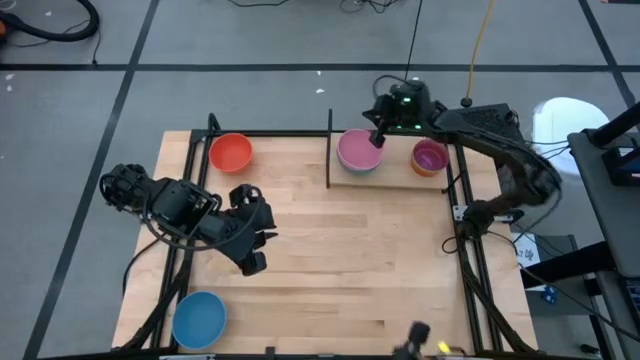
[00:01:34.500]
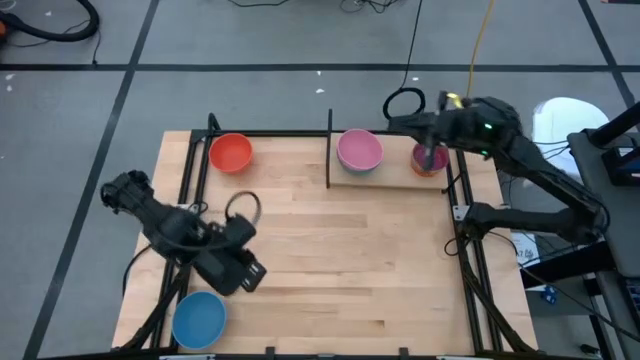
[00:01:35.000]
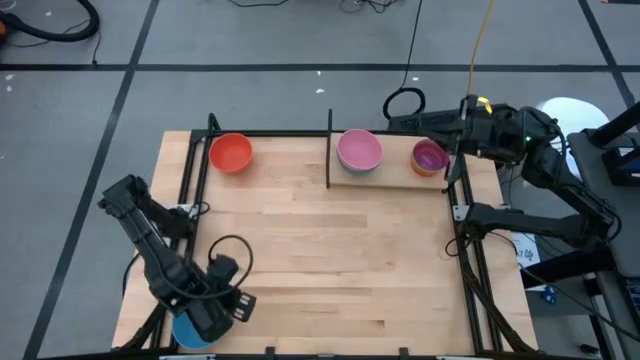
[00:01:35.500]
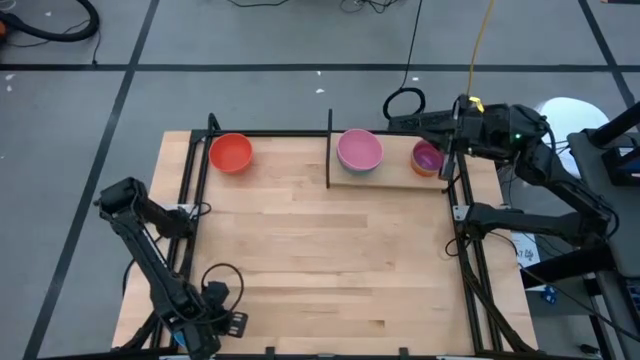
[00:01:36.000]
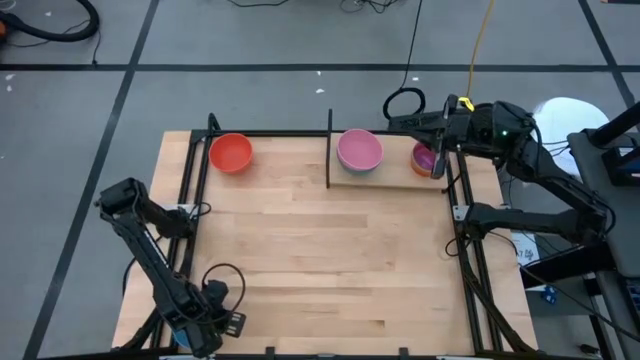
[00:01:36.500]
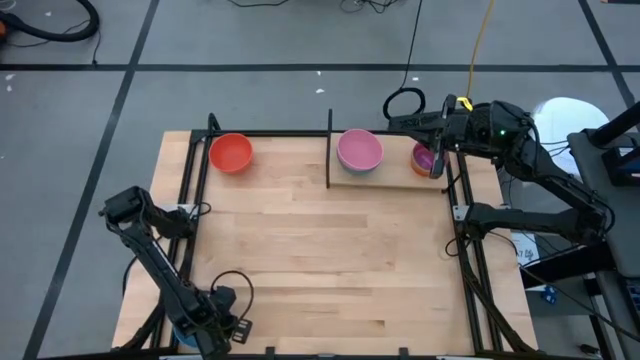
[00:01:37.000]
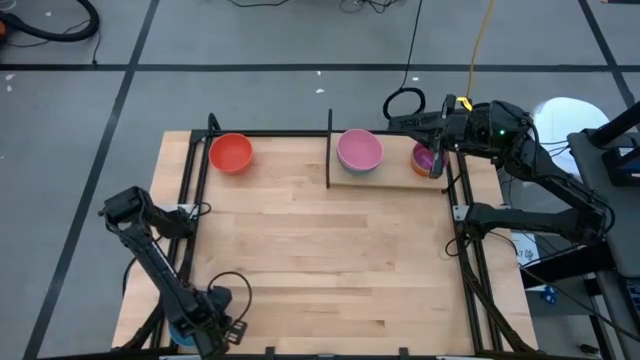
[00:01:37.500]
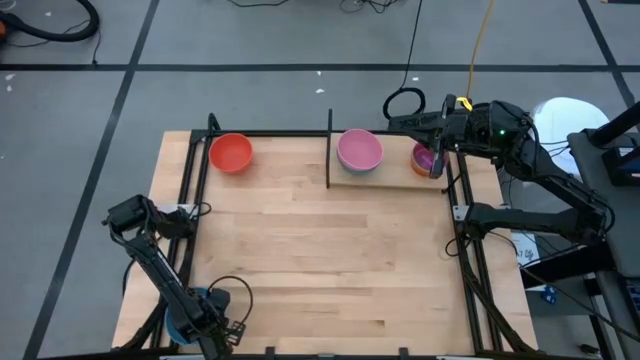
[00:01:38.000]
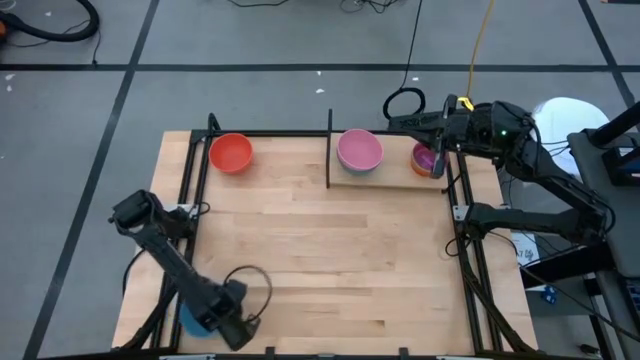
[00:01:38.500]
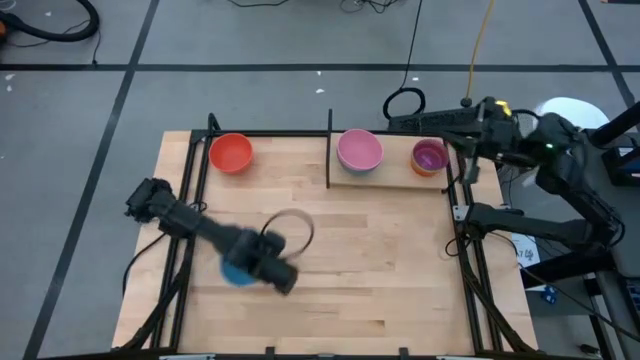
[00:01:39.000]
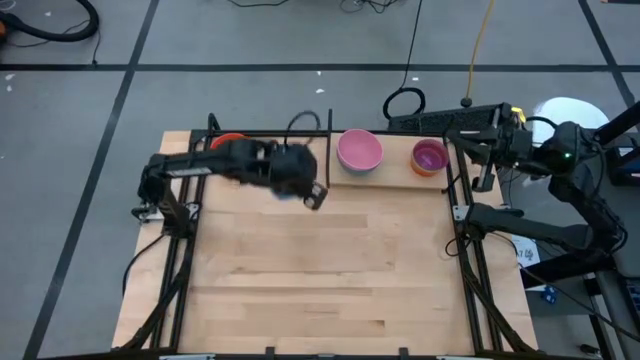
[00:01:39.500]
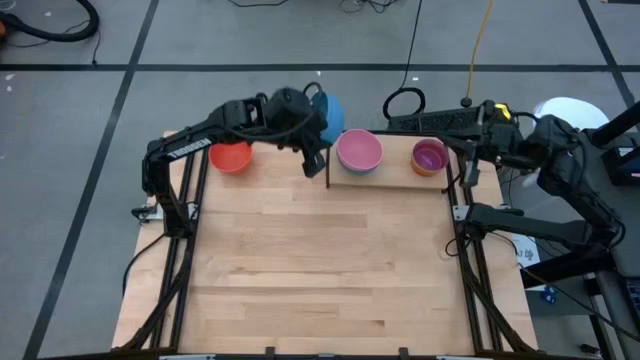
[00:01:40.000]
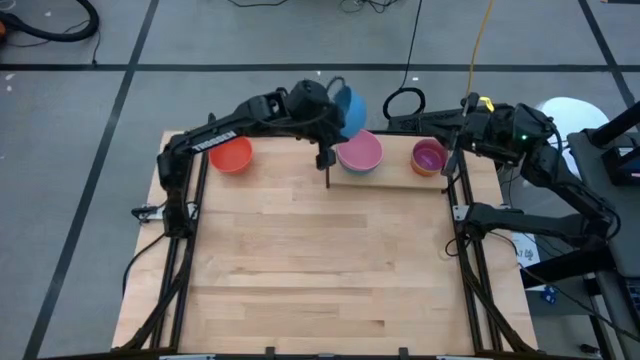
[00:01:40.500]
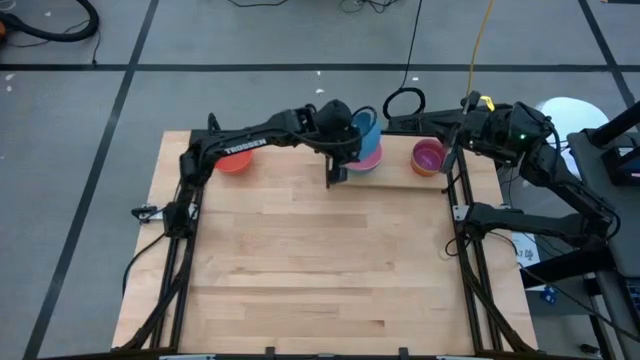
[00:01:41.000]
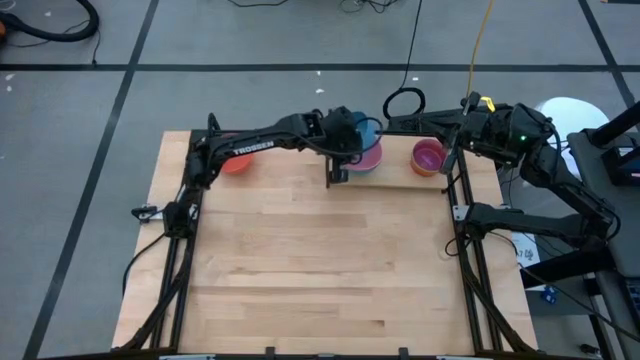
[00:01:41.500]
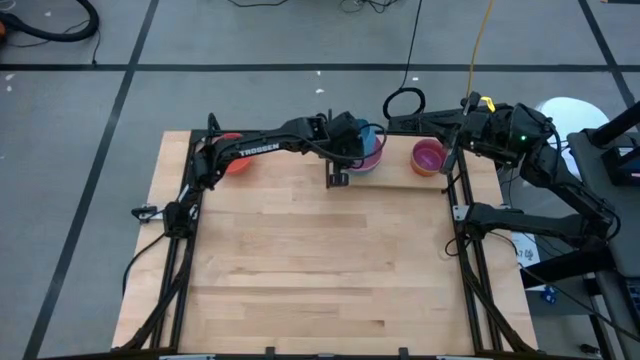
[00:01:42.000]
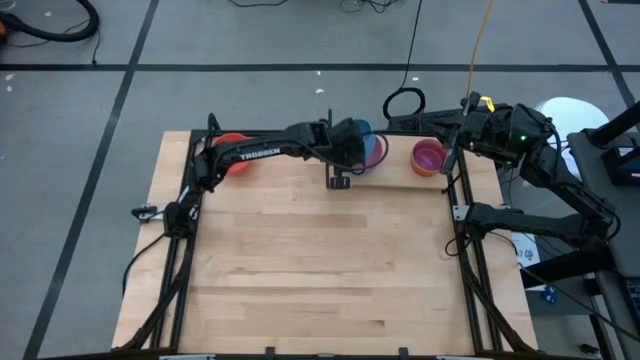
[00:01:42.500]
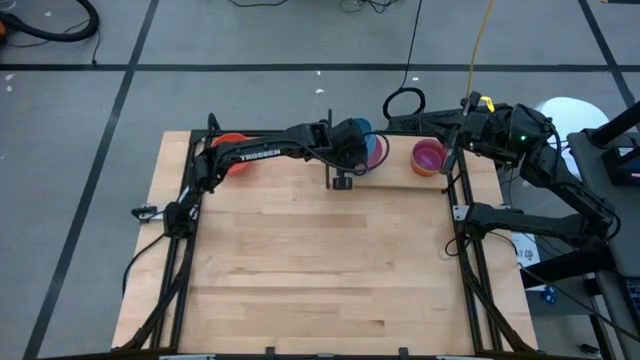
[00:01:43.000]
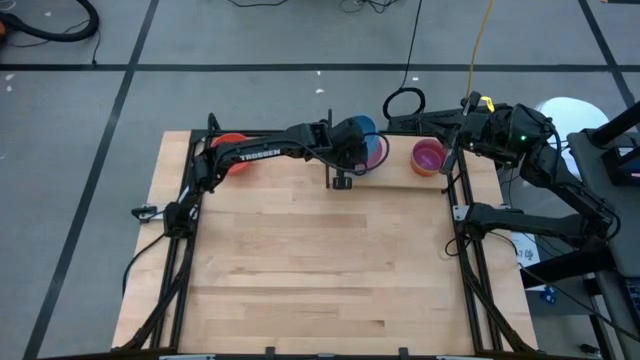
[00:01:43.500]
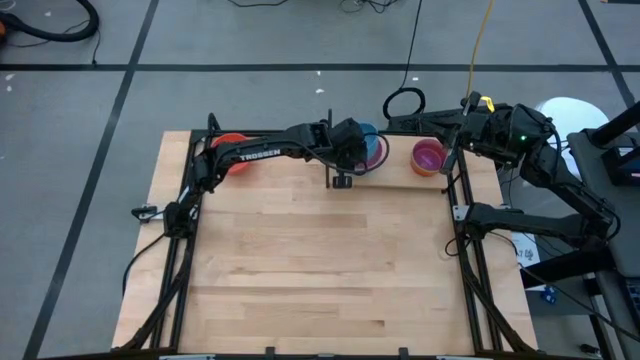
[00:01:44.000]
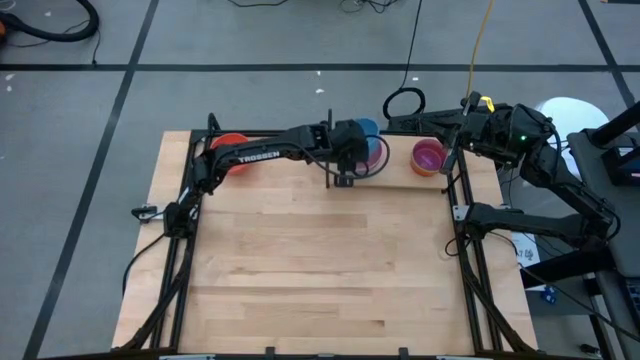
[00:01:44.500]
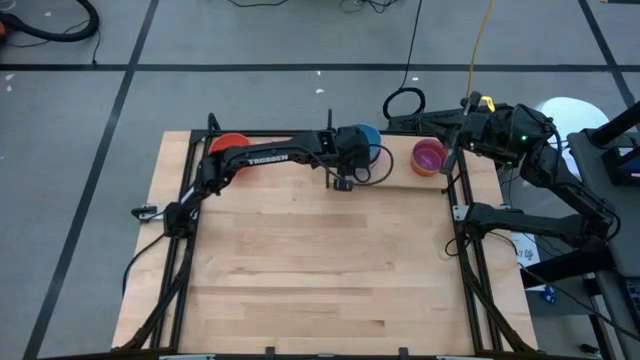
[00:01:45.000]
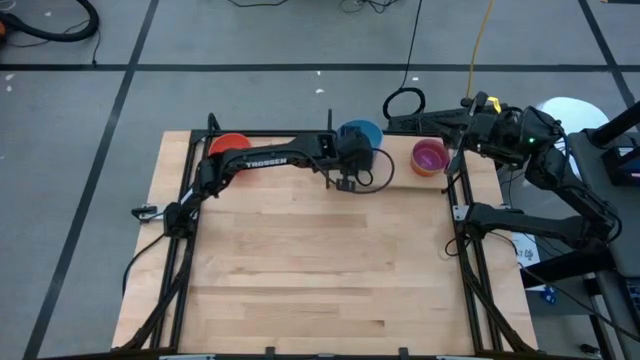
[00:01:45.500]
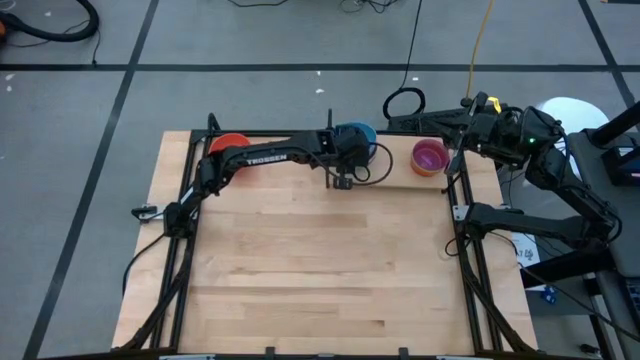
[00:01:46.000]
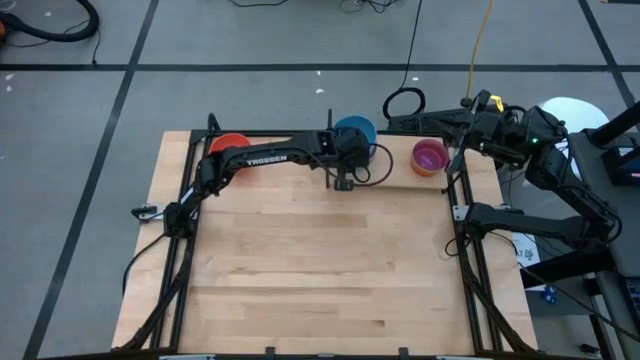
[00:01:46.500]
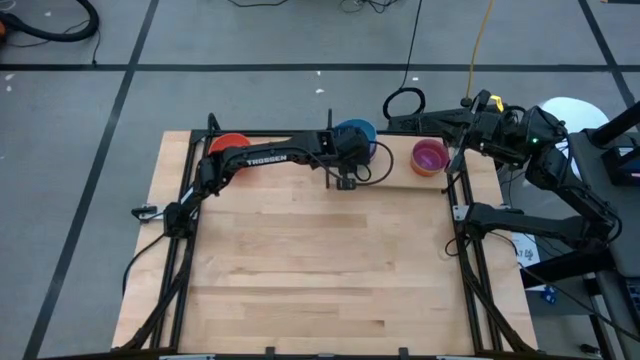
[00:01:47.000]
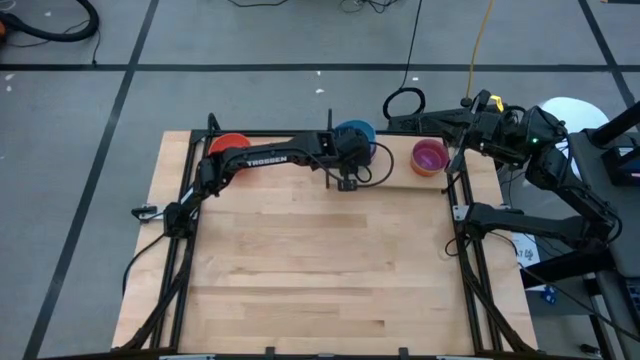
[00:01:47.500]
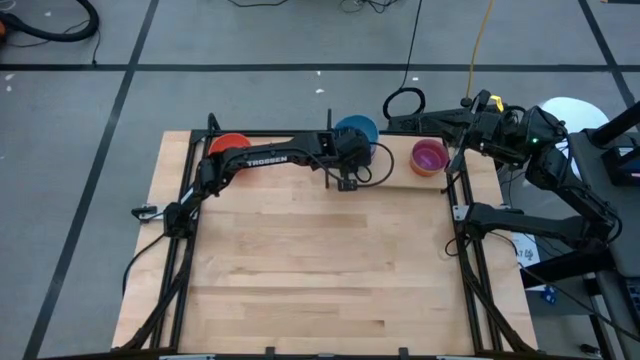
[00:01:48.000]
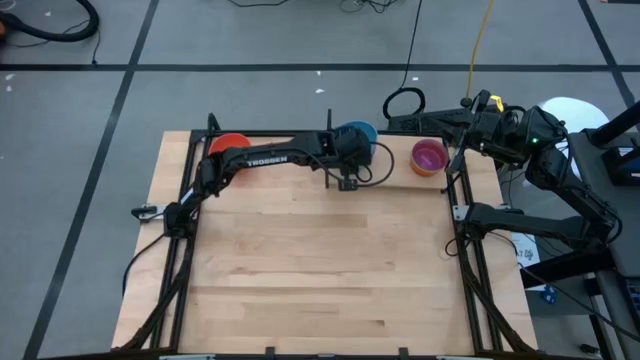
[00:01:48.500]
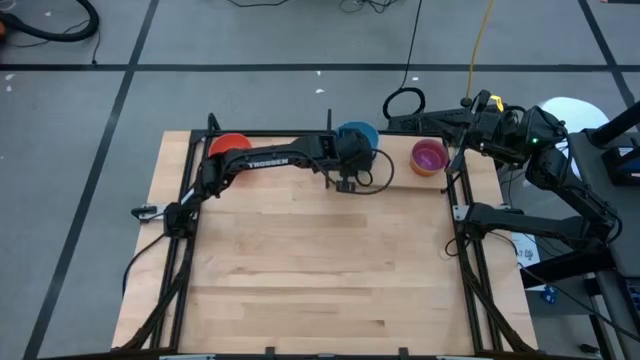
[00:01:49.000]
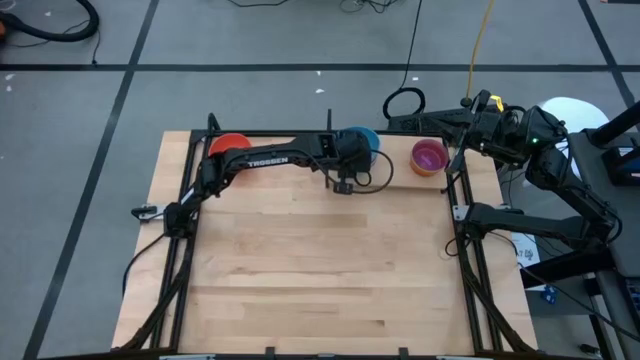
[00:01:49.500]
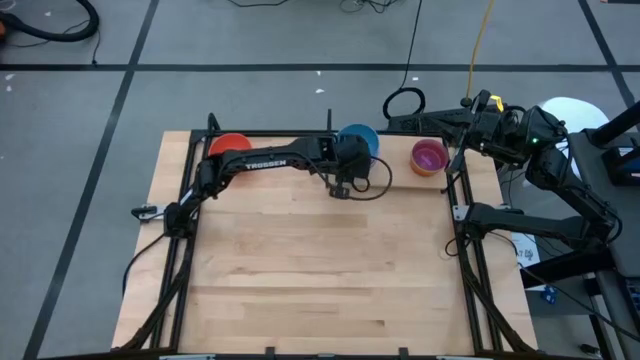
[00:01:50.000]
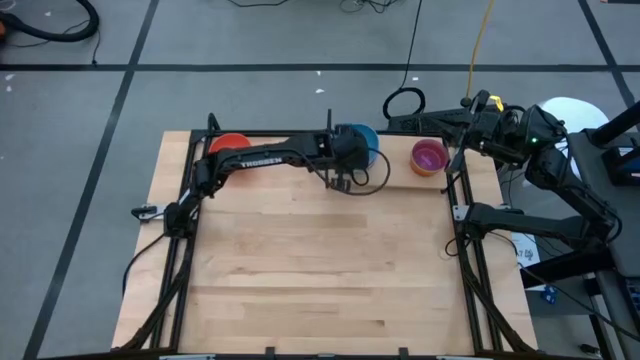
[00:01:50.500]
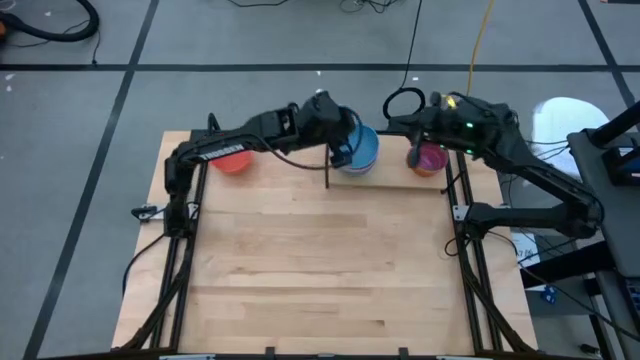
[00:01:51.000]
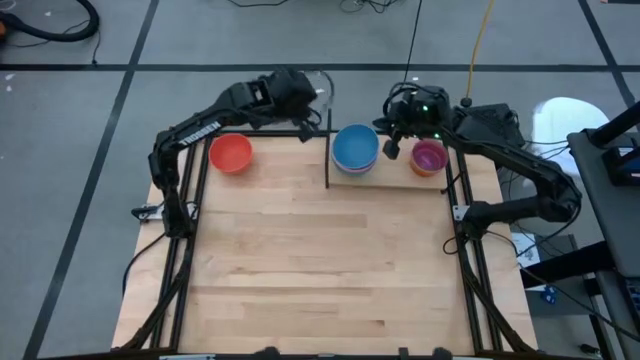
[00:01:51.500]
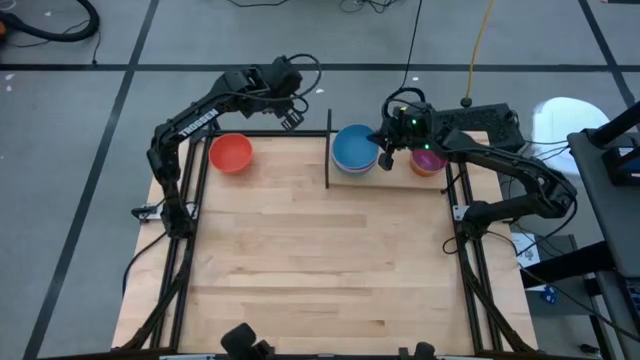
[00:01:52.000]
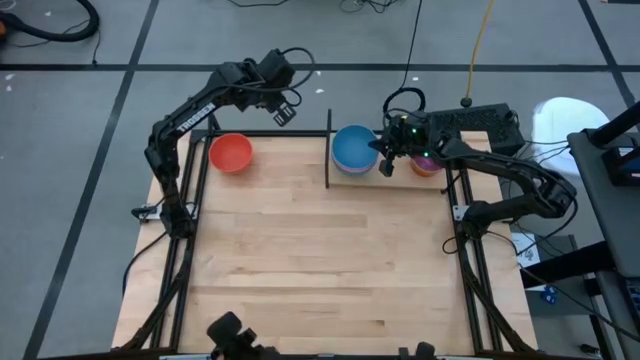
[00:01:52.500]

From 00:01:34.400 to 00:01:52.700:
Task: Place and stack bowls onto a shelf
Stack the large blue bowl on top of the large pink bowl on the shelf

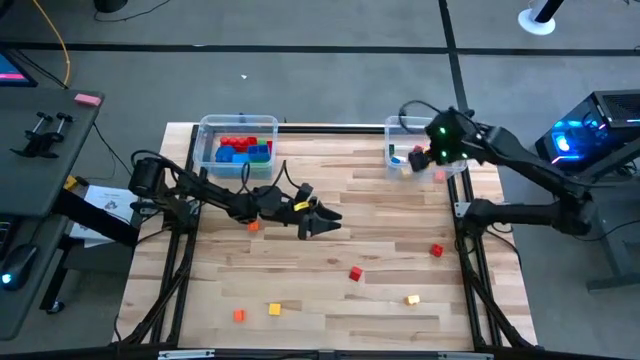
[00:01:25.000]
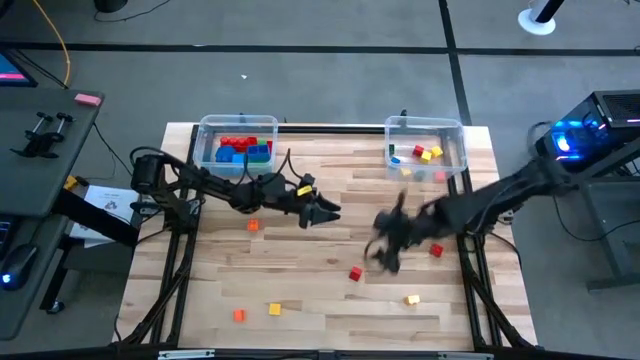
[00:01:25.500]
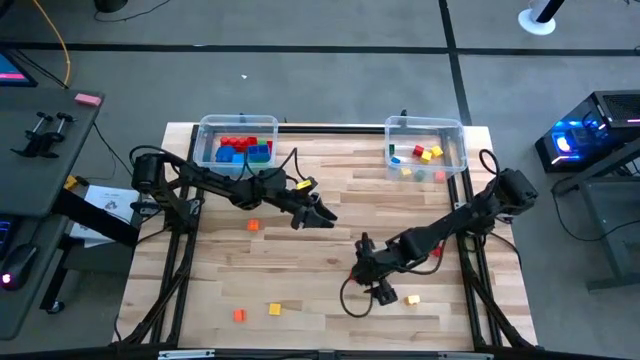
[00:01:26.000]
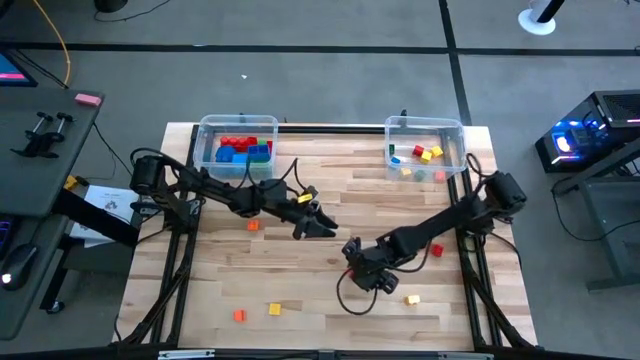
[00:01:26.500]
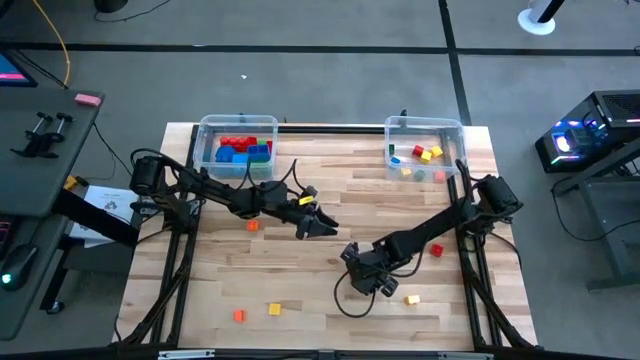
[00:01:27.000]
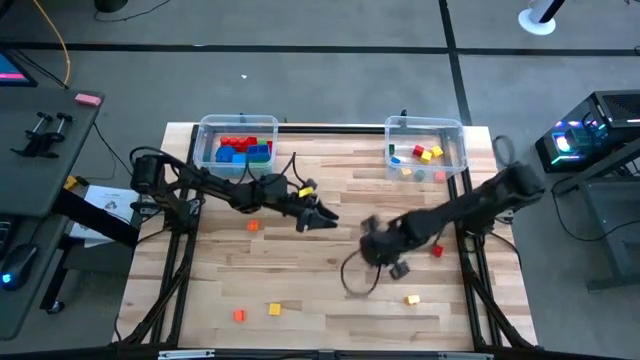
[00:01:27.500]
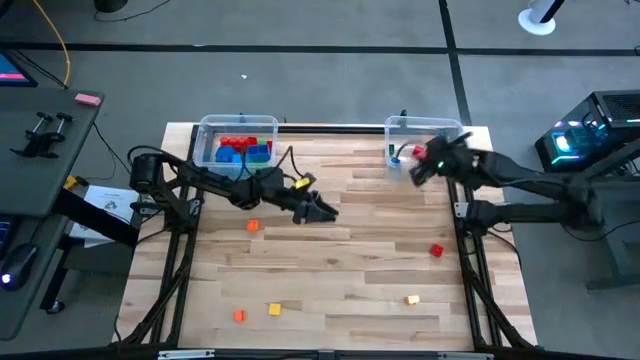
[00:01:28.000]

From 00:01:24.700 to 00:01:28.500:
Task: Sort blocks by size
Put the small block into the right transparent bin
